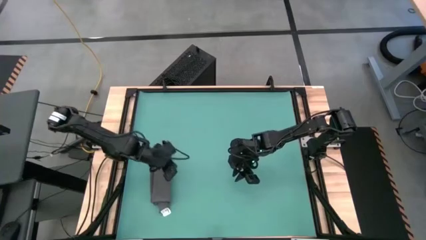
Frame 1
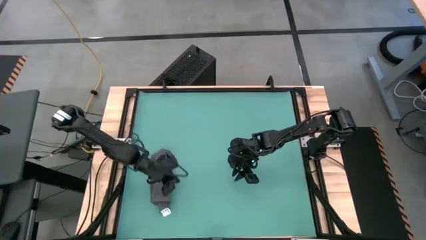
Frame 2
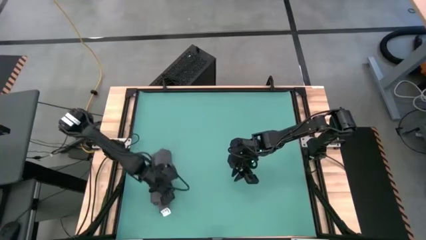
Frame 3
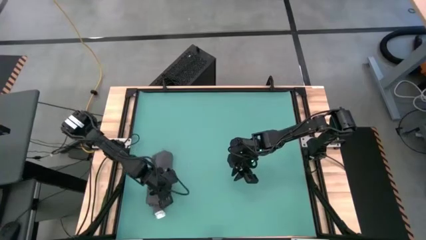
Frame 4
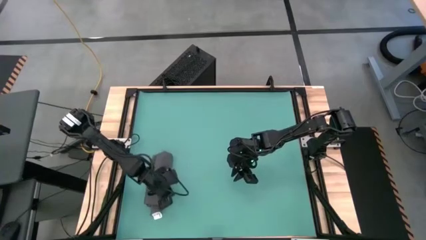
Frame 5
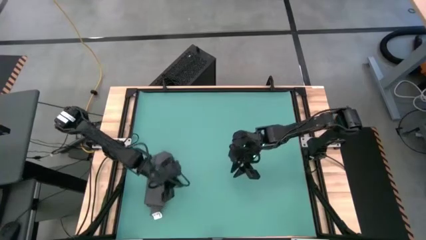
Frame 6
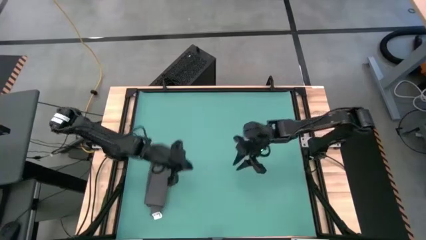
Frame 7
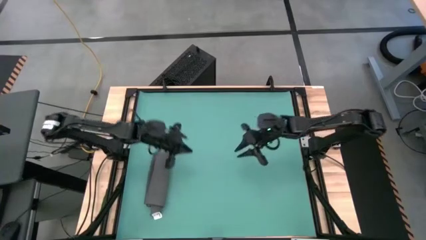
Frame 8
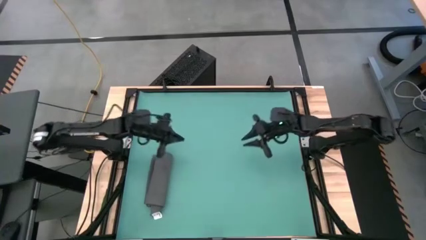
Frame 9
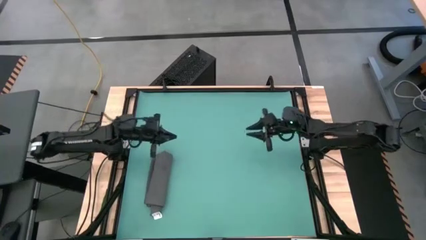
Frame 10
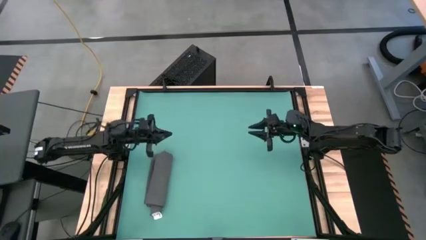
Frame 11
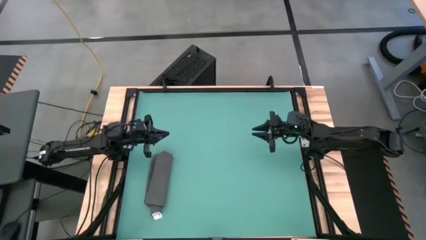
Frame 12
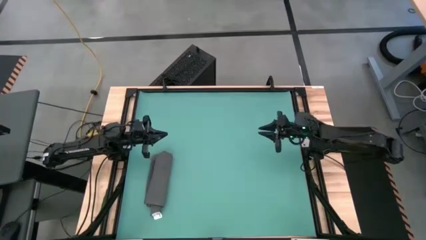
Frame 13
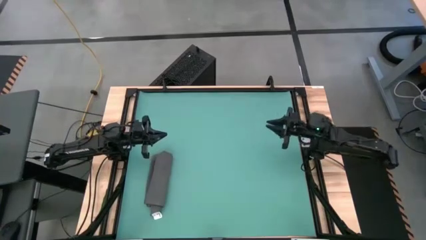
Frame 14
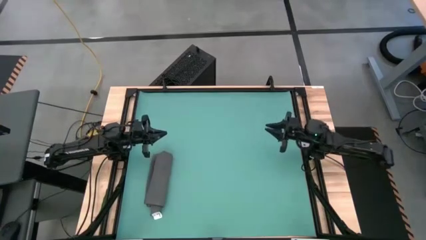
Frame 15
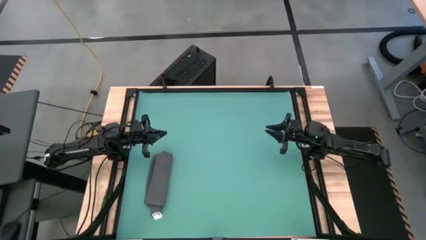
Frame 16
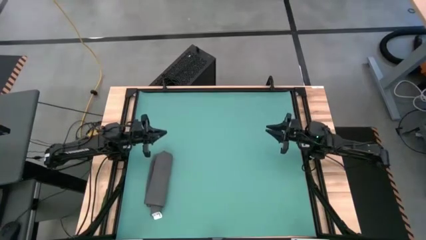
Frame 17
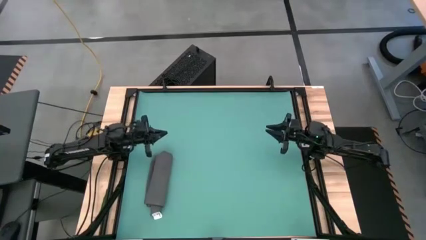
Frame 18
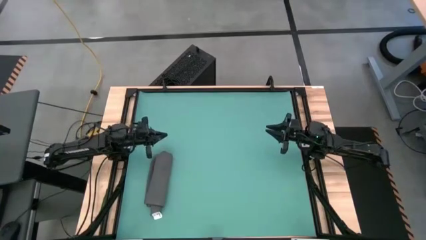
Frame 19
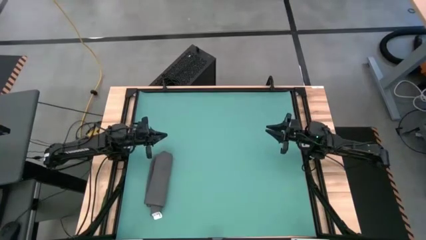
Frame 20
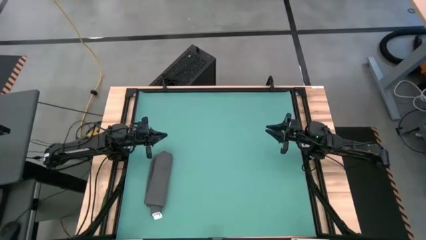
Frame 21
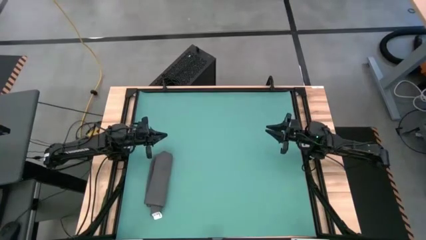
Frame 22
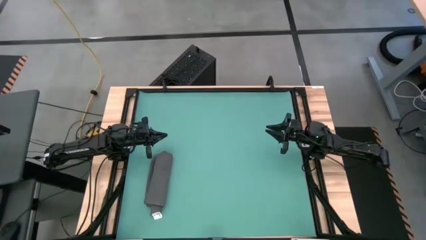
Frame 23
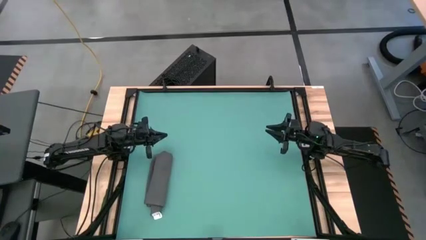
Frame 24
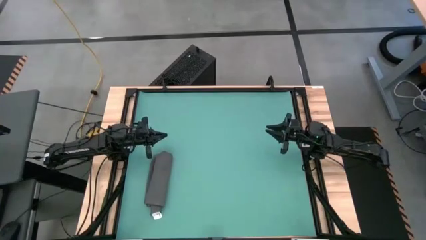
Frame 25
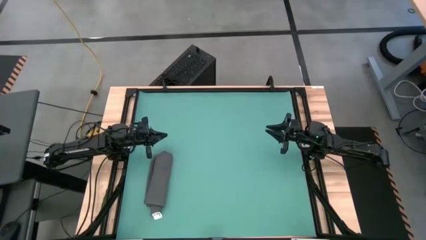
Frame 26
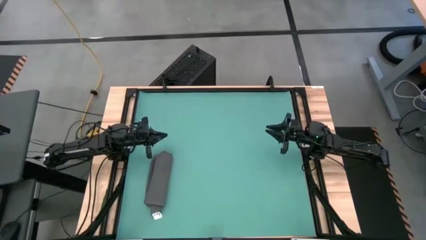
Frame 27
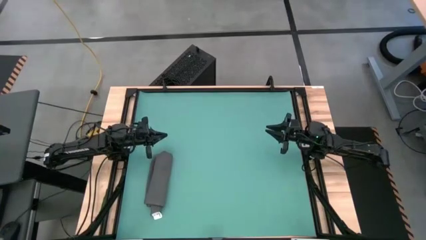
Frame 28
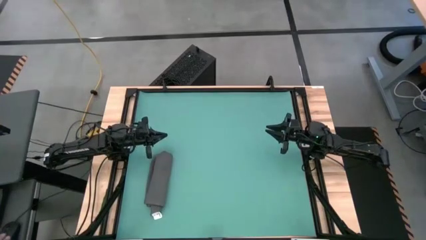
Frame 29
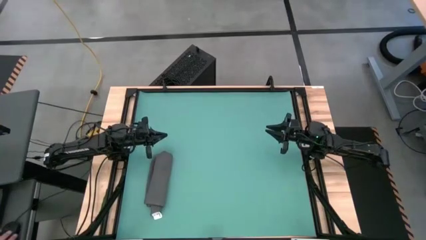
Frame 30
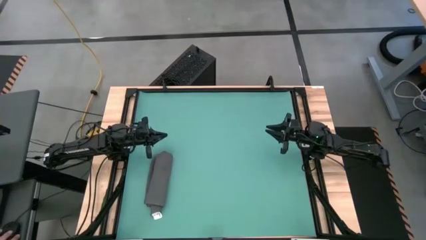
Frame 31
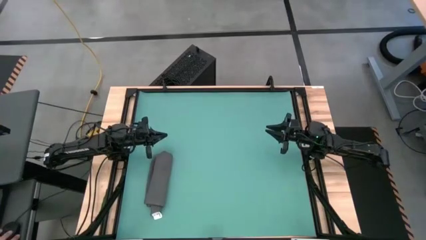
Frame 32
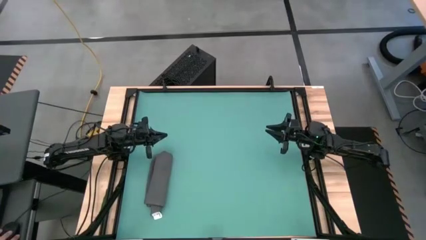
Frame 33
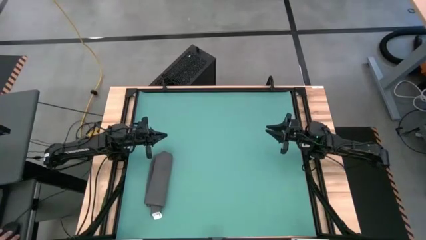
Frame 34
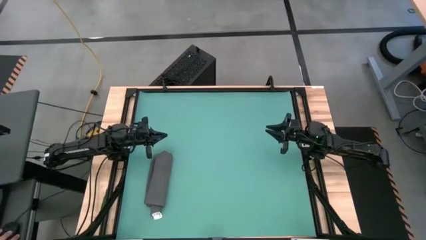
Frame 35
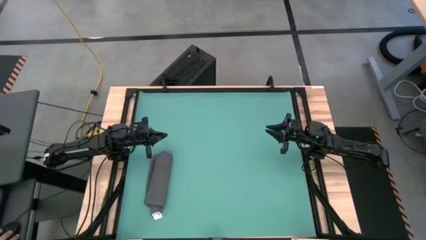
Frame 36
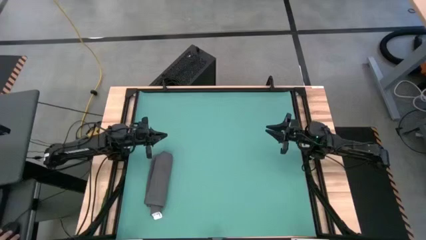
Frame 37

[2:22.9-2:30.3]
Task: Roll towel into tight, uniform cylinder
Return to Home Position

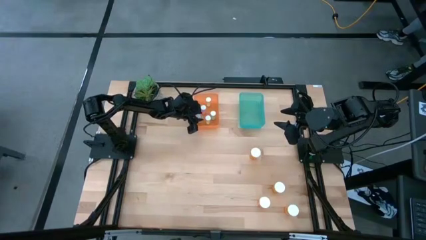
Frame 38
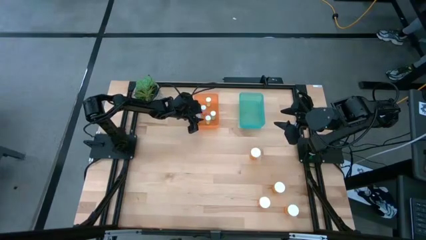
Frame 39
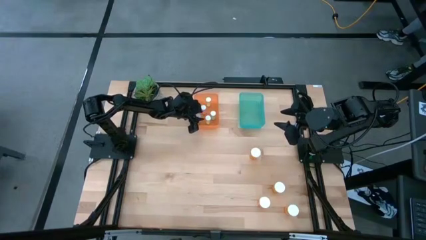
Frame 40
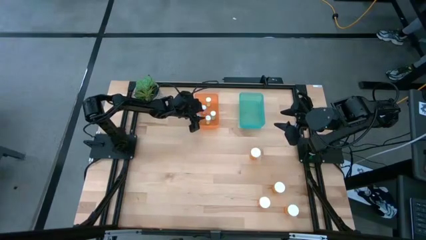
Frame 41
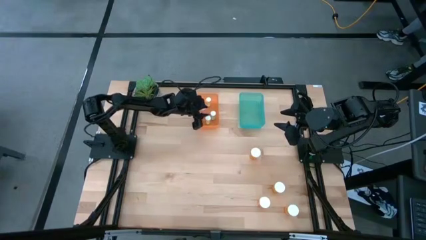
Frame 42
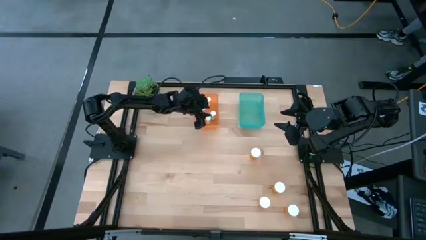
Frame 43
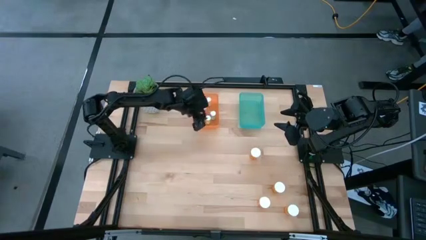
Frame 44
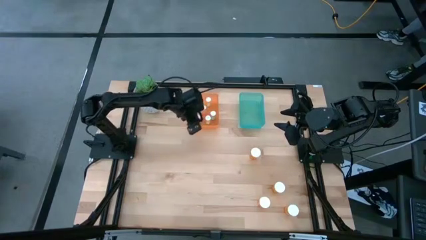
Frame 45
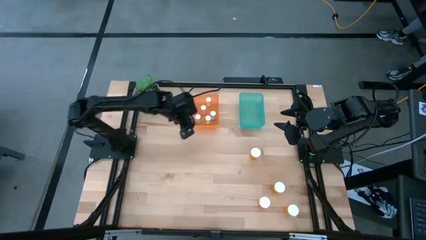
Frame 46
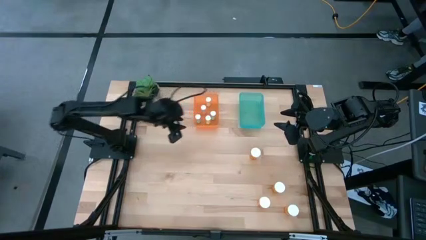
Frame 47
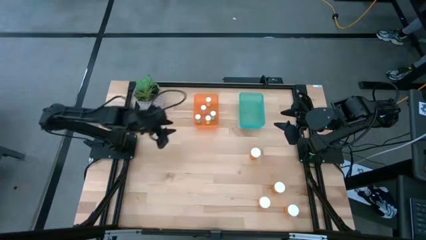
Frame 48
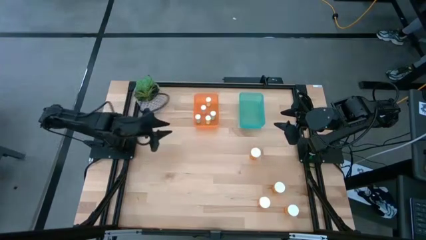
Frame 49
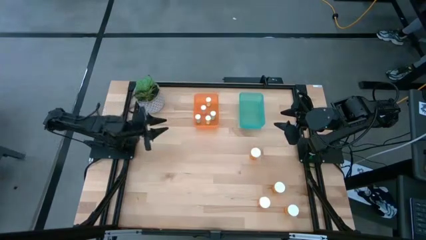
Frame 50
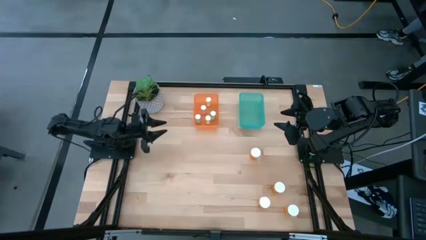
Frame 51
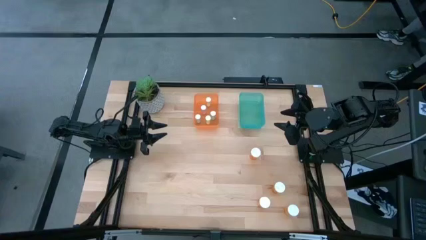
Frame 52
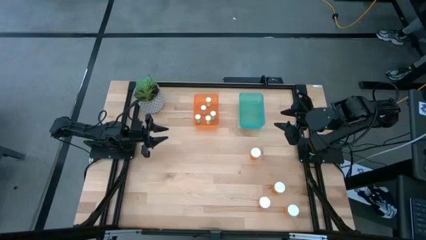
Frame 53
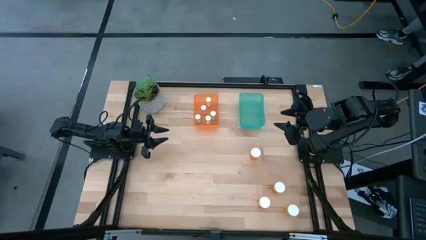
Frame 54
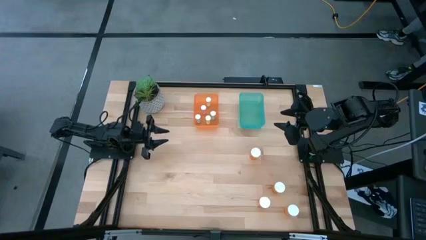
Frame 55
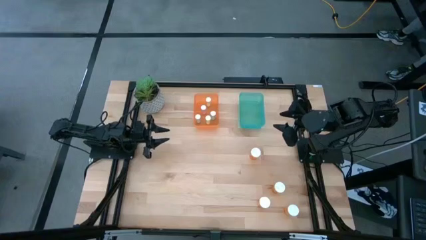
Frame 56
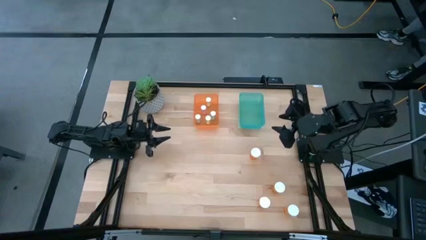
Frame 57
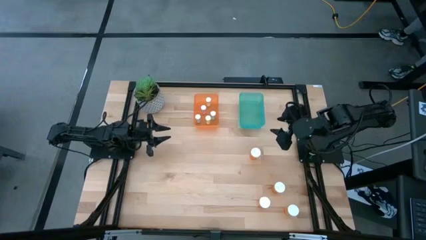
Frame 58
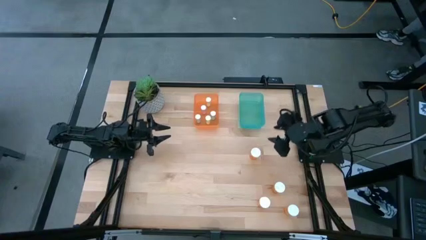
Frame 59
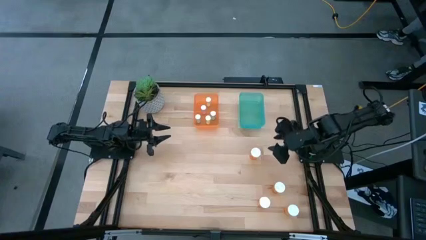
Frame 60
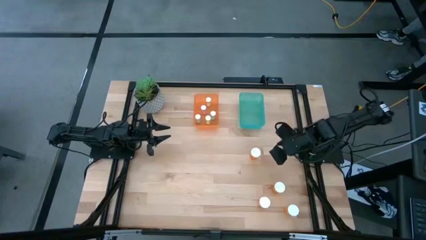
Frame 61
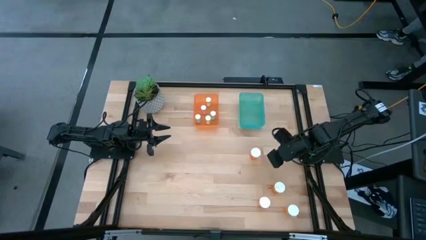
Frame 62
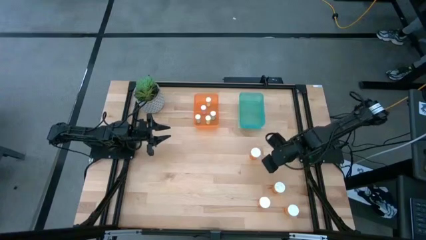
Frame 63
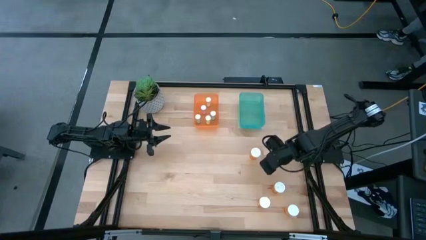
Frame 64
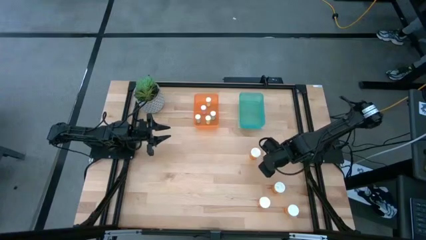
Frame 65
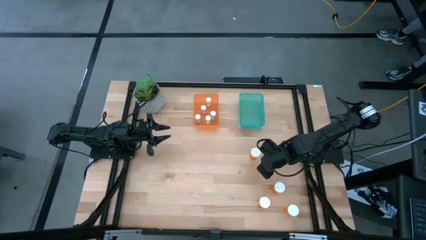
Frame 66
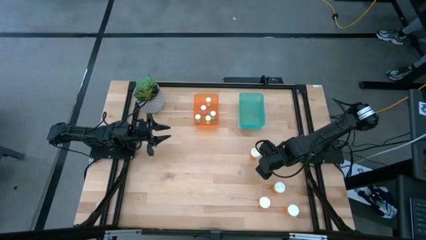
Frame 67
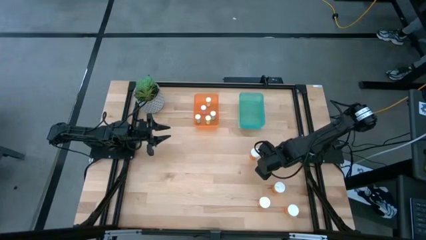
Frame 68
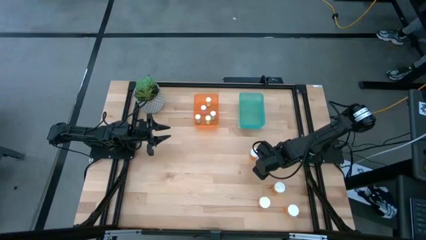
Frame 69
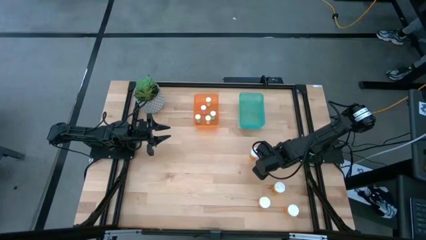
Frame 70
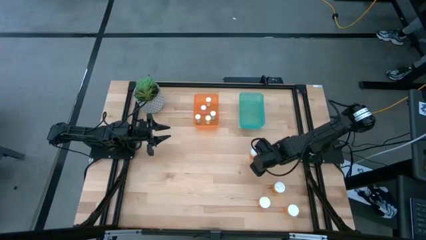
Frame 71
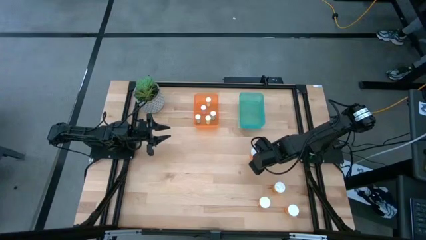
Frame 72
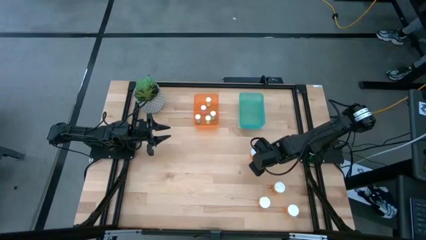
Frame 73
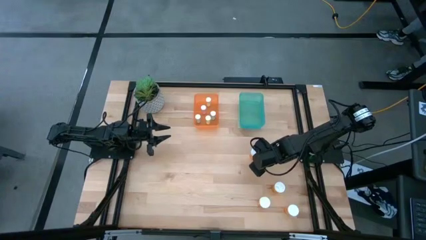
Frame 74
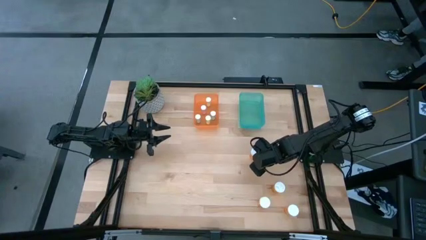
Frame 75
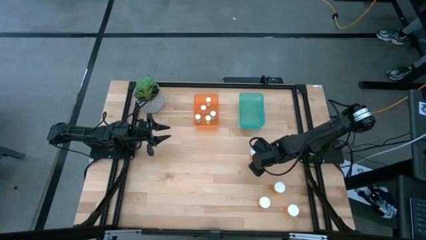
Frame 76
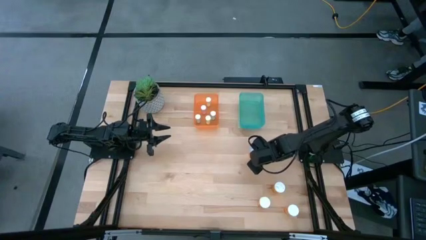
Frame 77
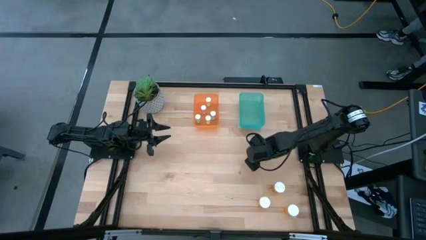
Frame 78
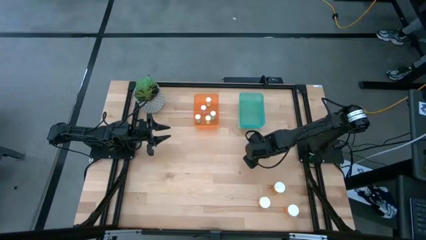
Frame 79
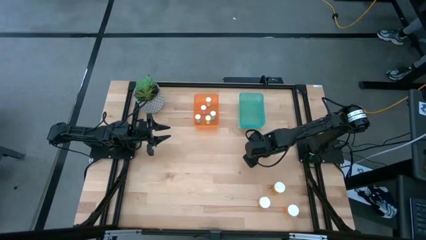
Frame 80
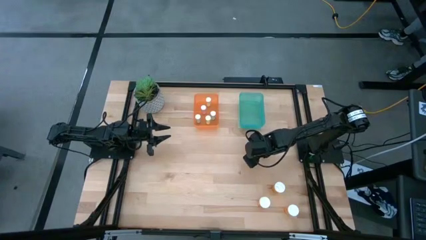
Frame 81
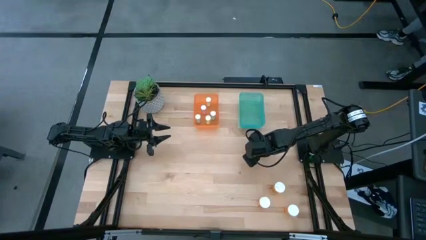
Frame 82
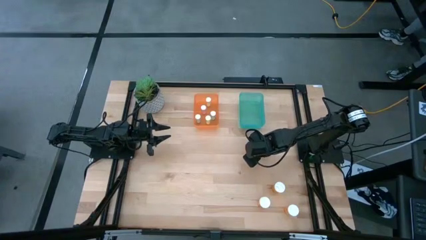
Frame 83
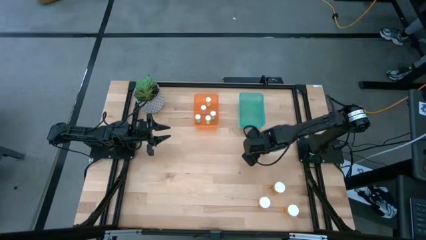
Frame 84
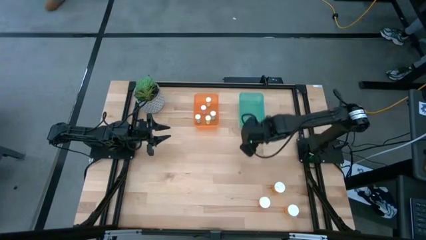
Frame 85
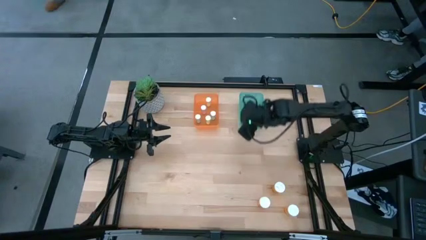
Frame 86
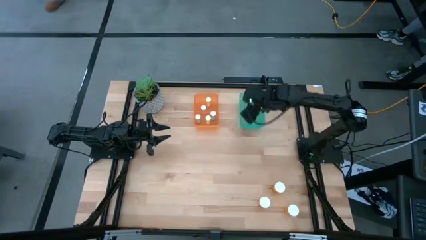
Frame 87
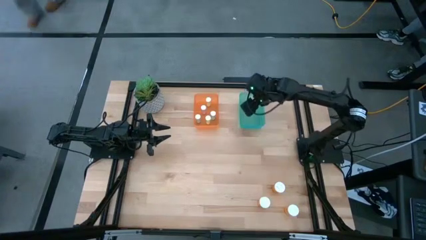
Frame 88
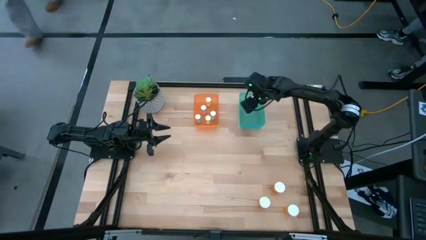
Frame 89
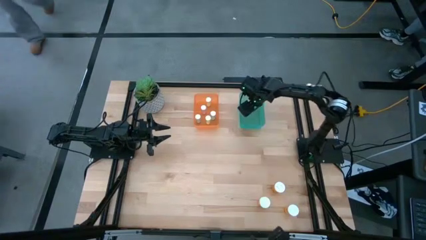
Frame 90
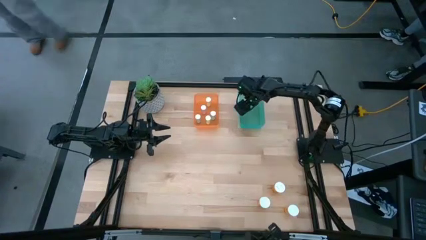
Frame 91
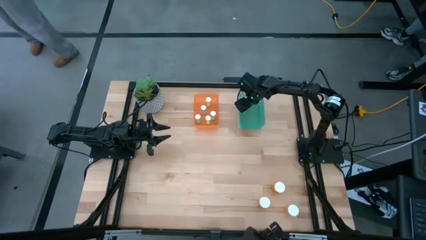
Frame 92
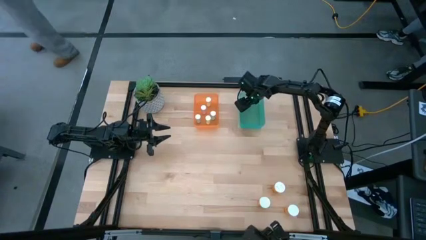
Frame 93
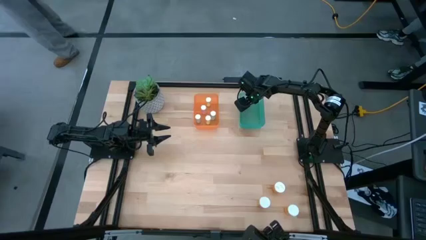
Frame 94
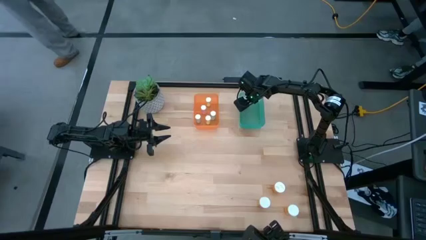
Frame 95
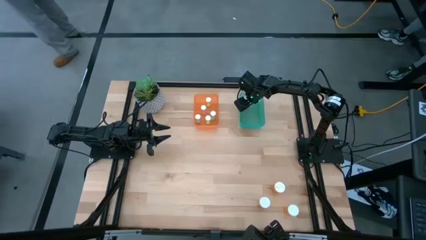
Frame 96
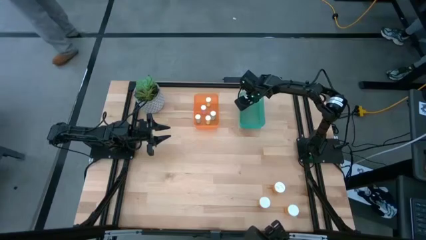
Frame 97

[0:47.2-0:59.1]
Task: Pick and place medicine bottles into bin by pill shape (circle, oval)
Put the large orange pill bottle into the blue bin
